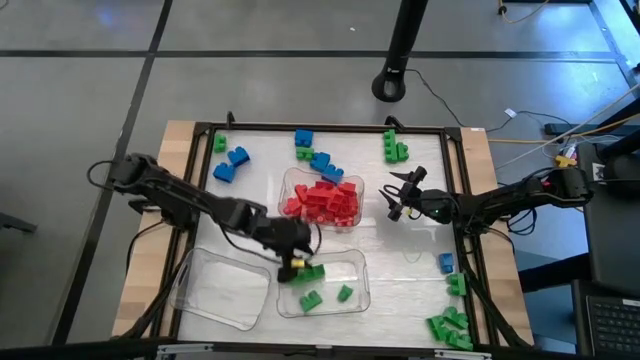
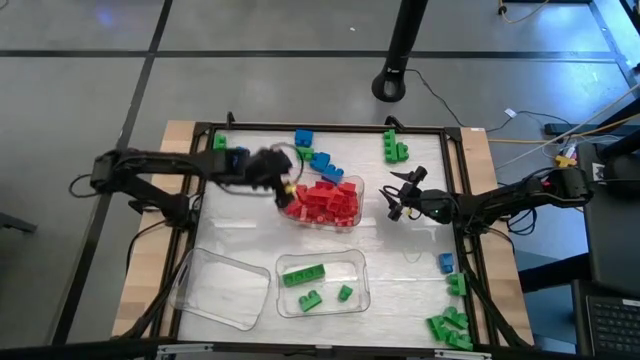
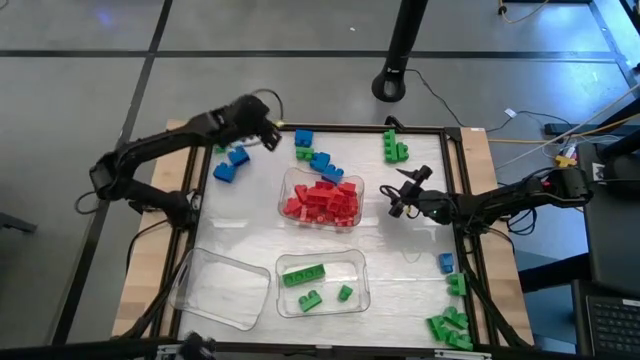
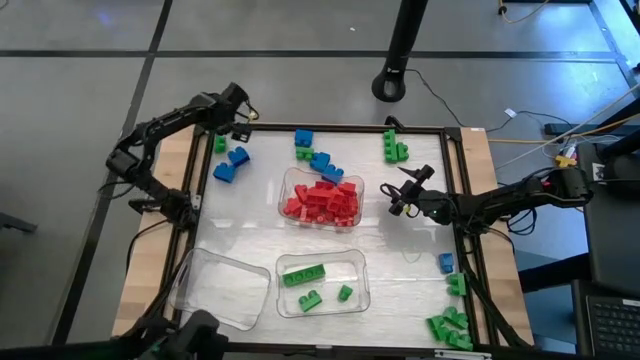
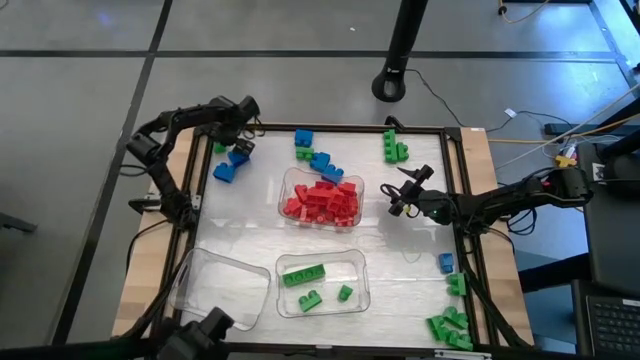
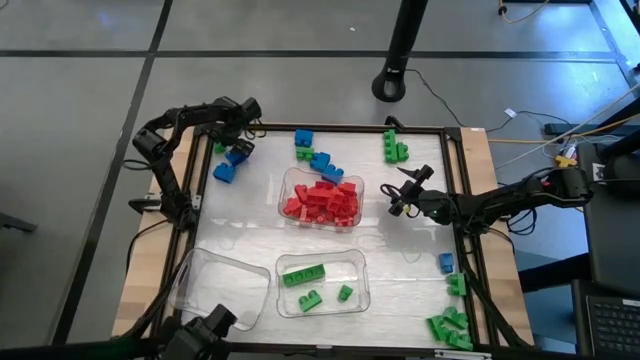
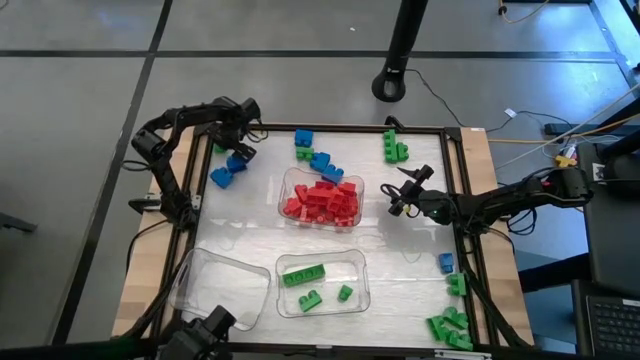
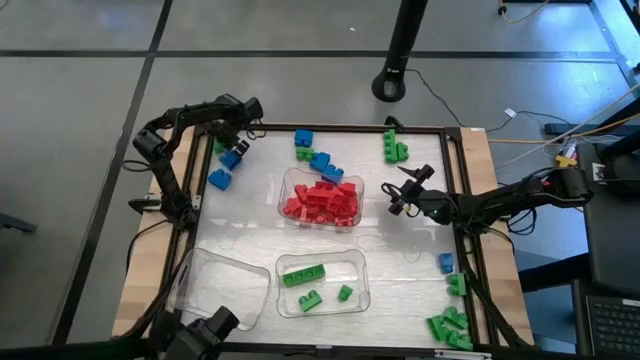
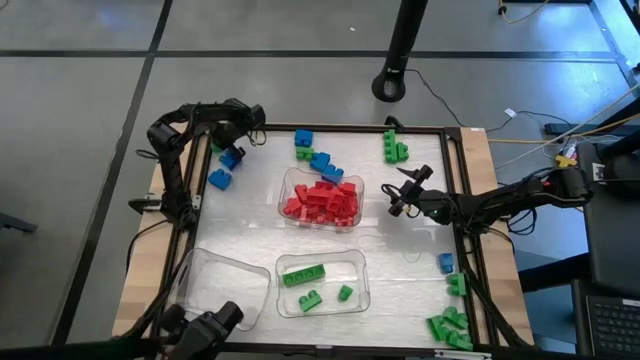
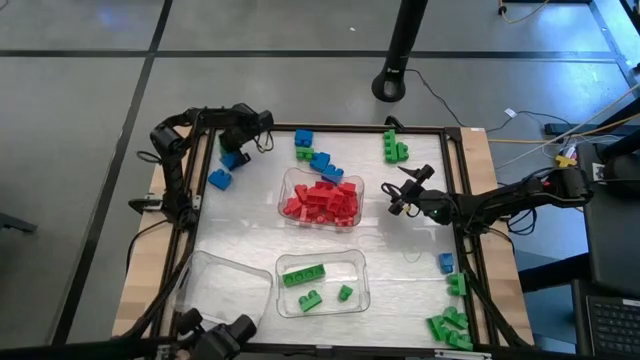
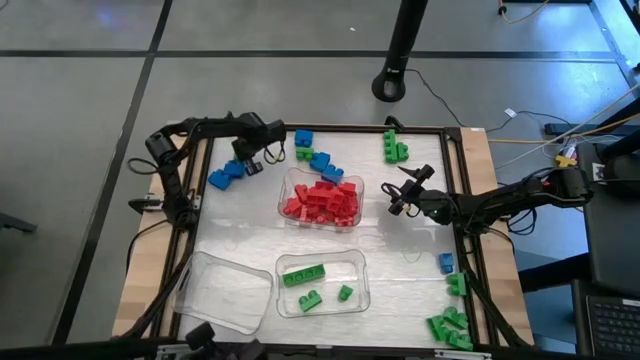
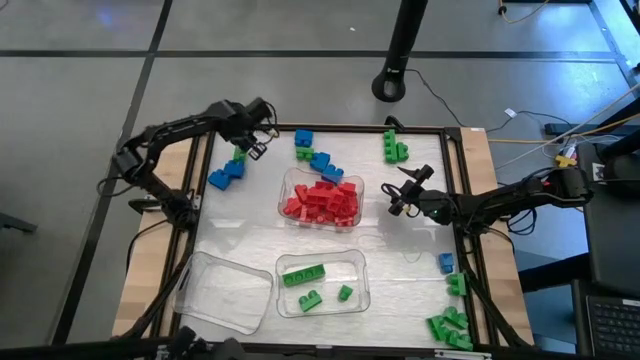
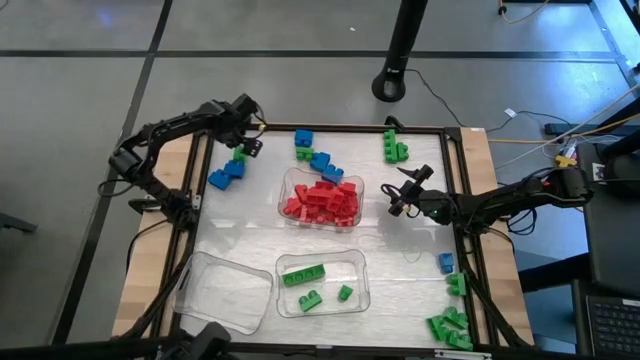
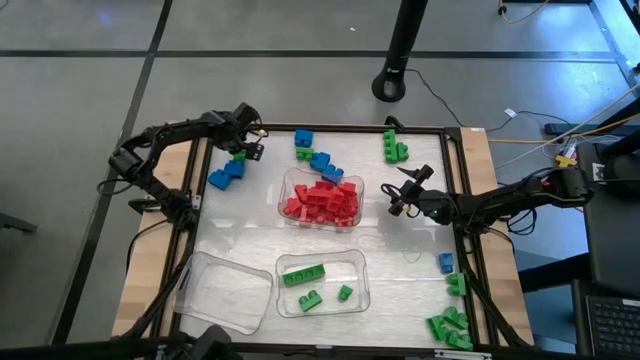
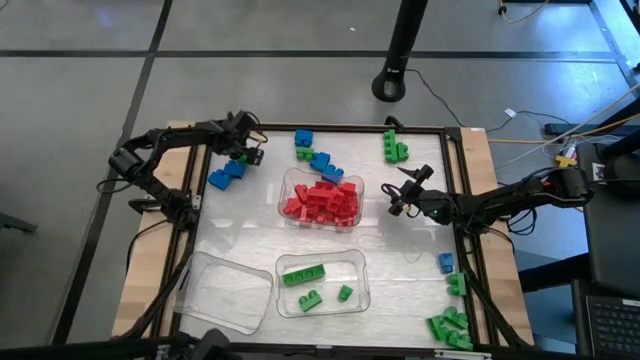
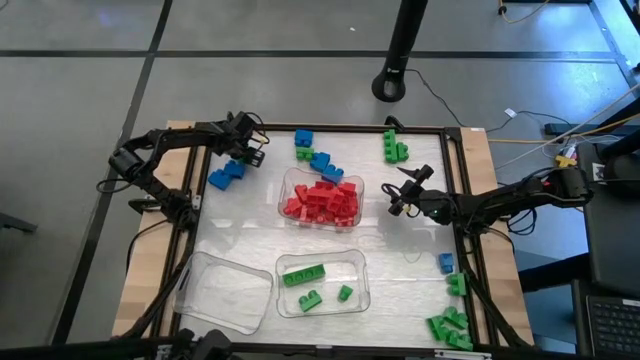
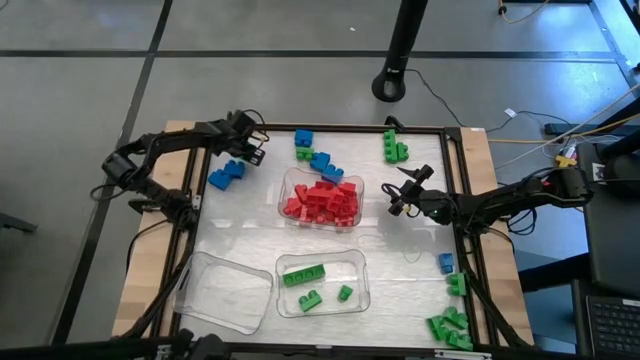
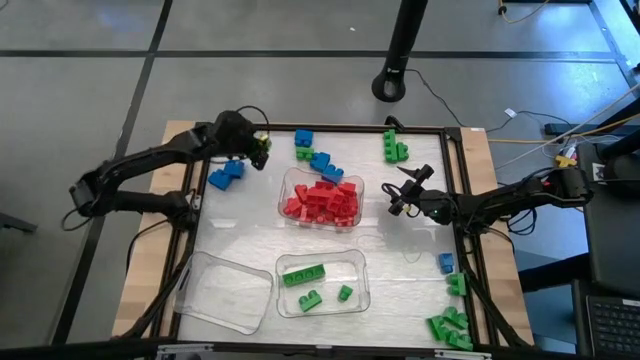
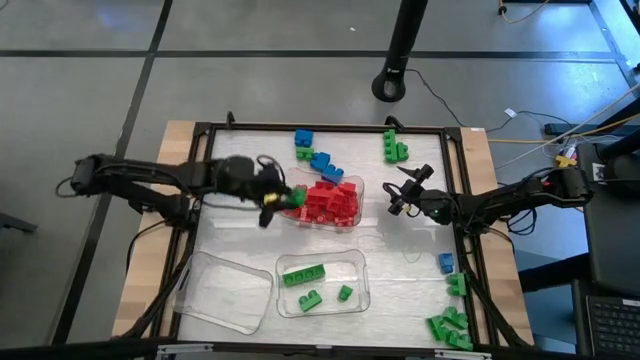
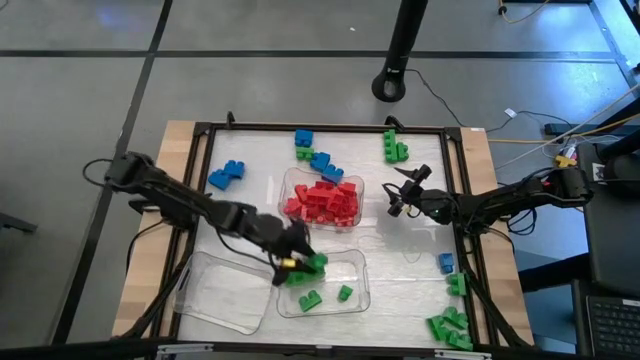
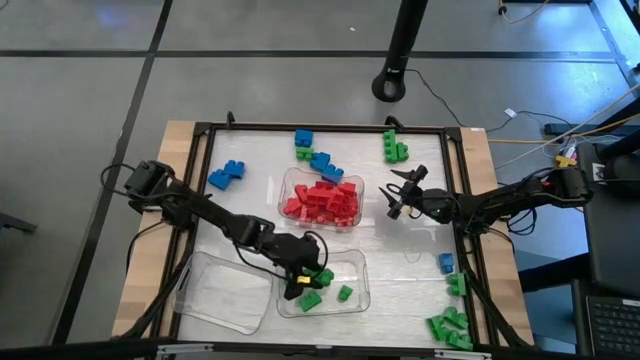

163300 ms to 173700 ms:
Task: Sort blocks
Put the green game piece into the bottom right transparent bin

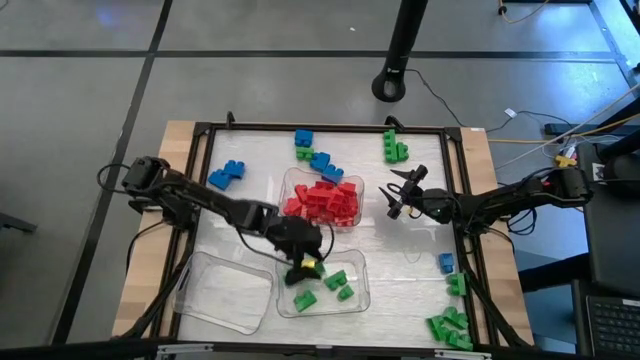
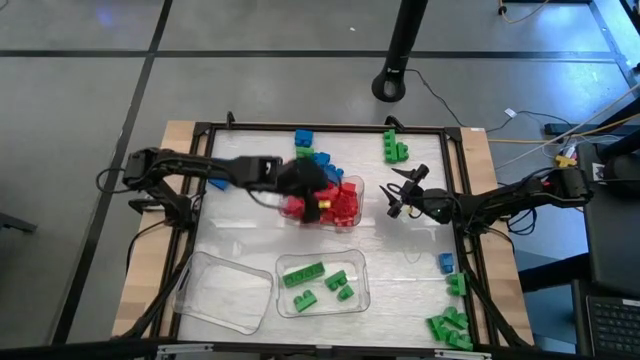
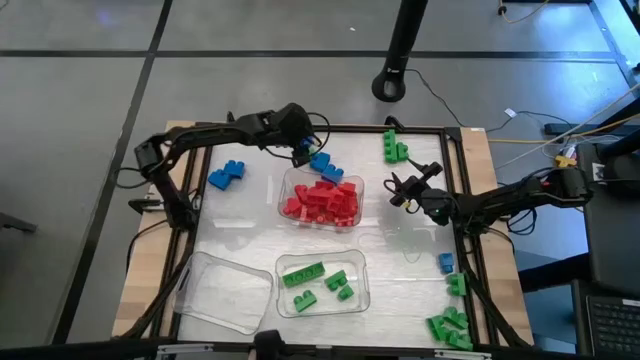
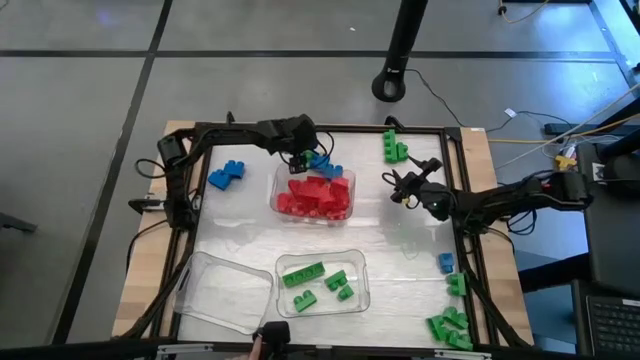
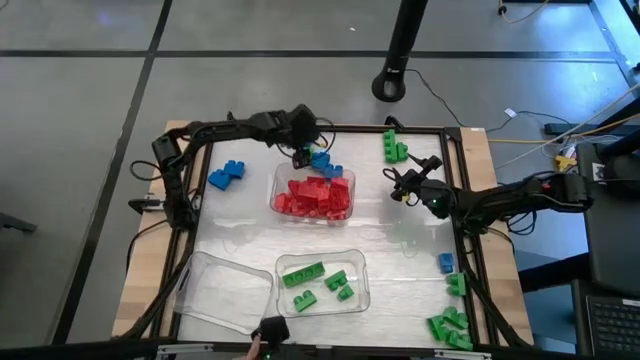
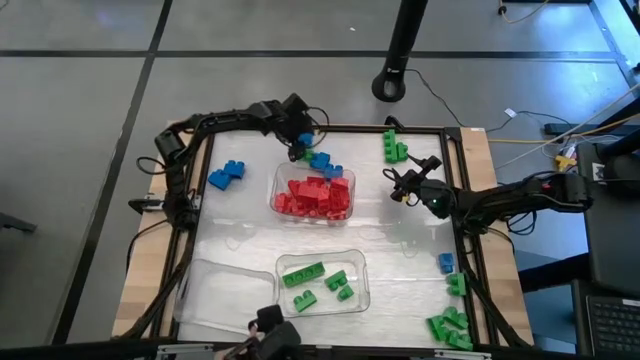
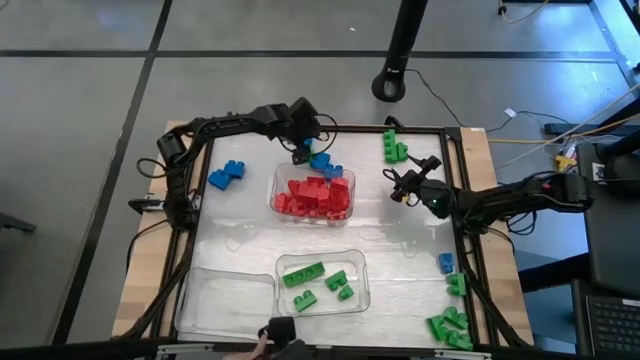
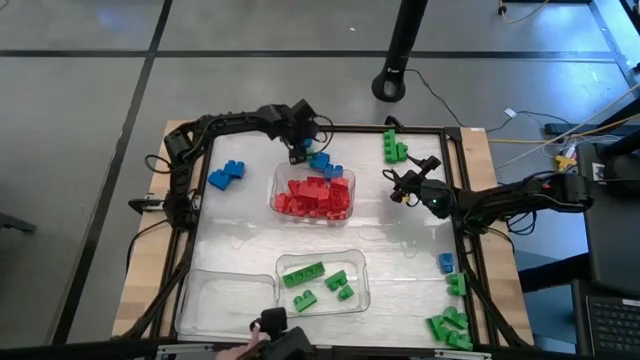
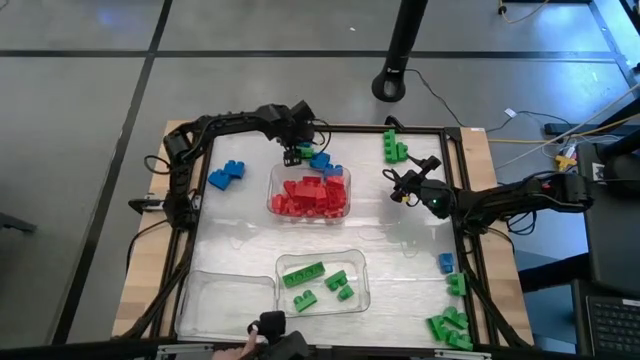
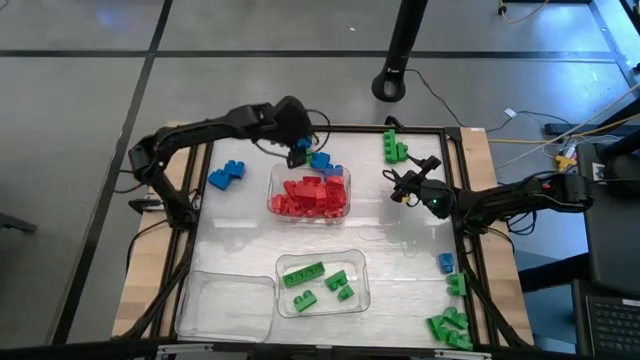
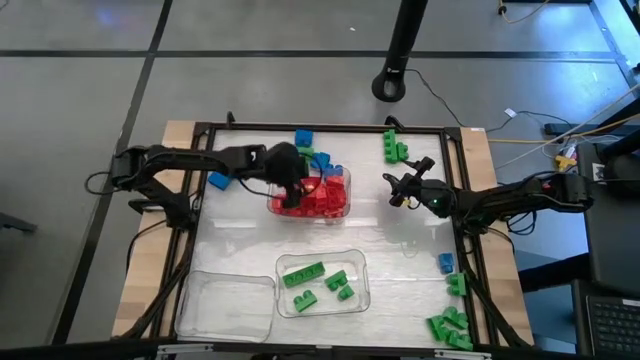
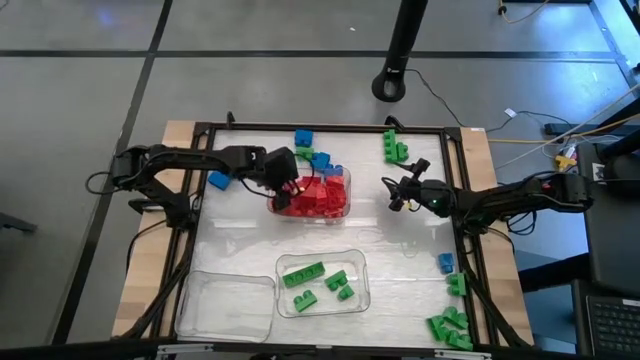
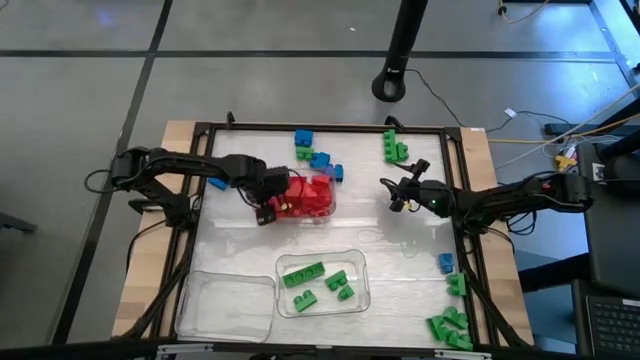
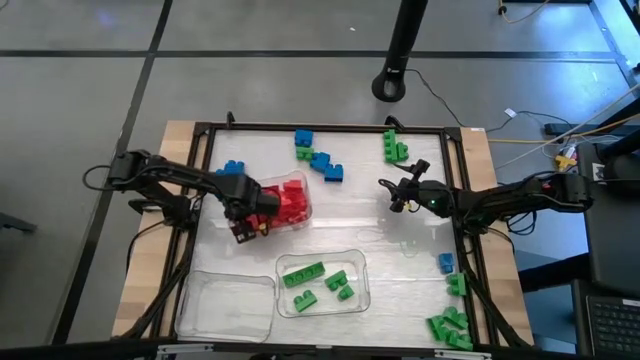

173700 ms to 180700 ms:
Adjust the top right transparent bin

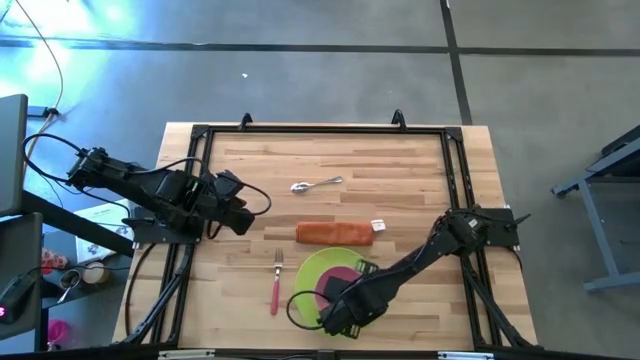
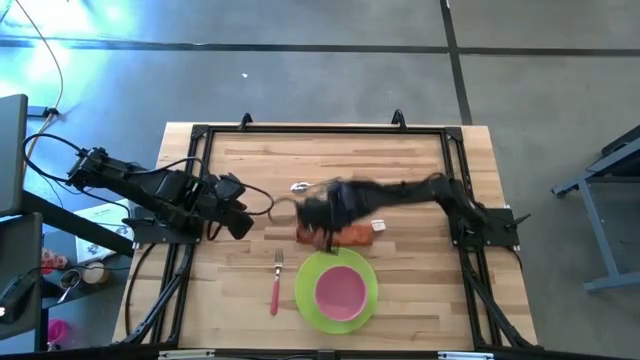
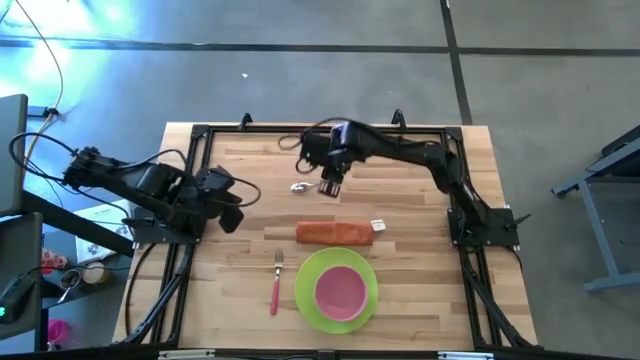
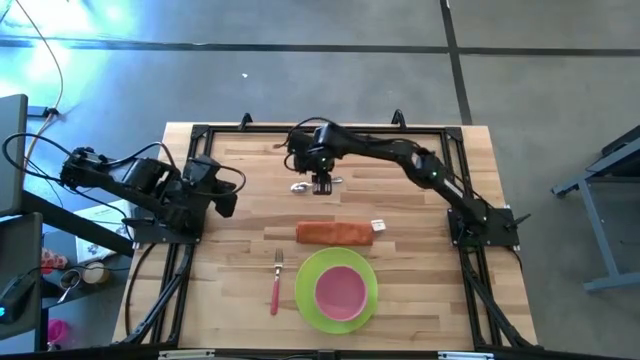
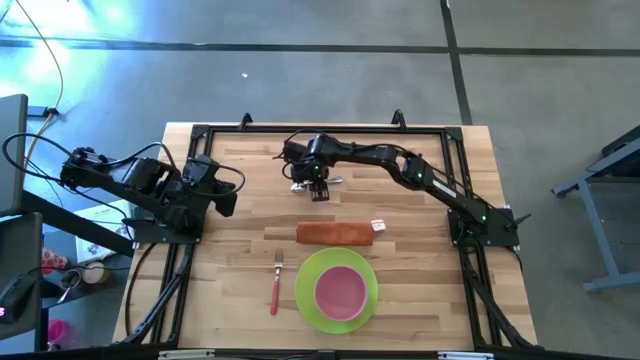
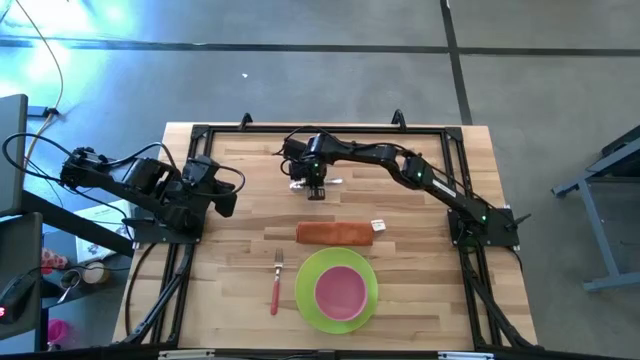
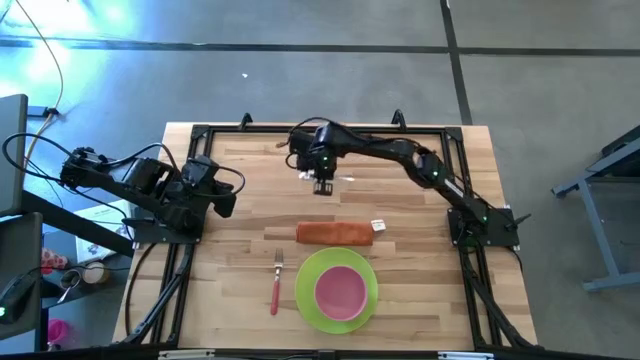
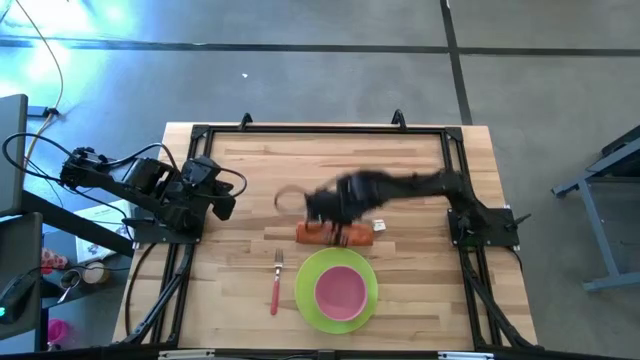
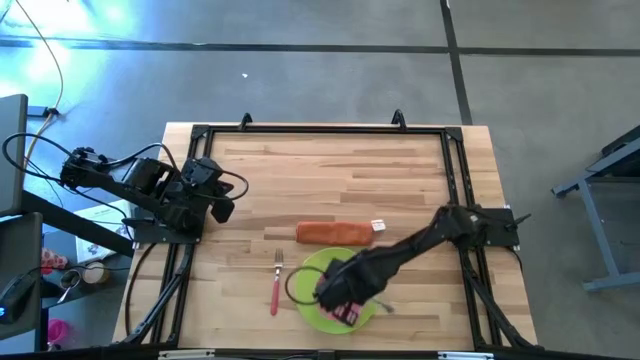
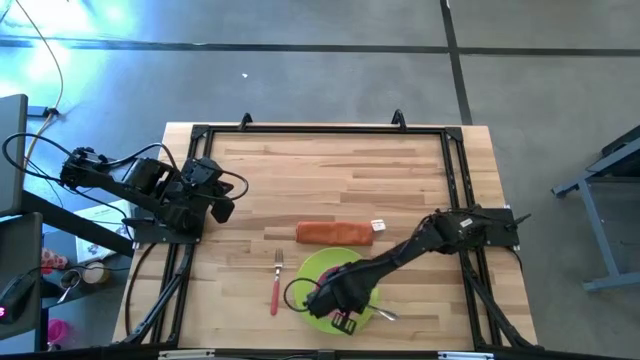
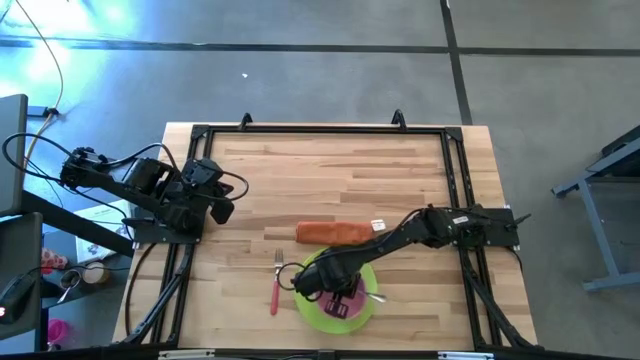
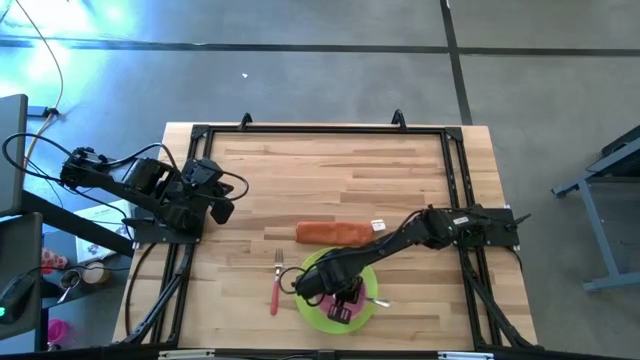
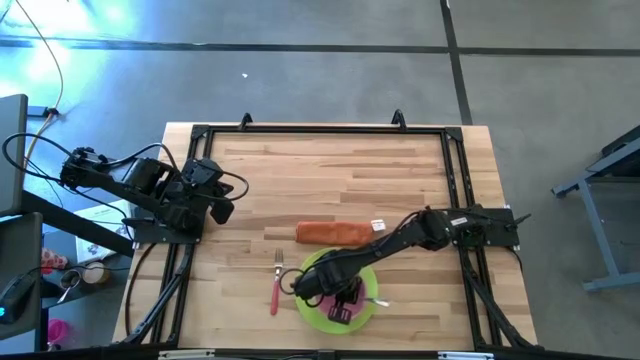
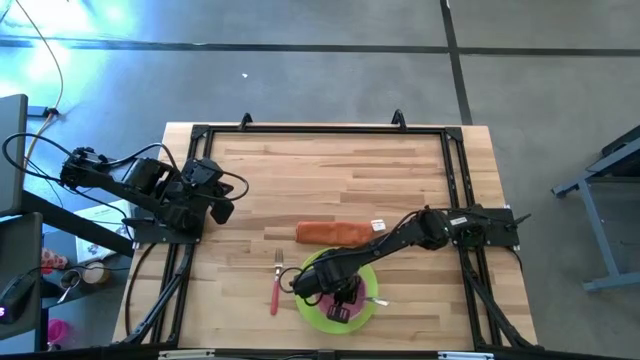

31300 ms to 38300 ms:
Task: Set table place
Put the silver spoon into the pink bowl
